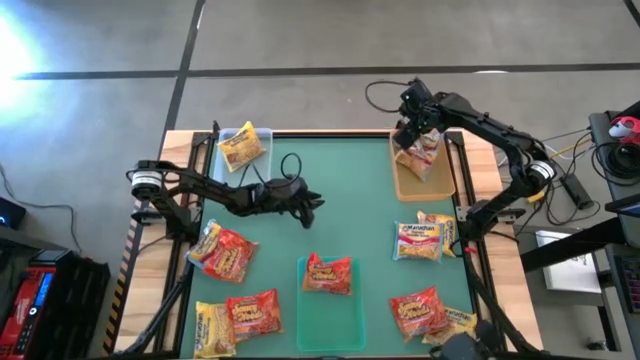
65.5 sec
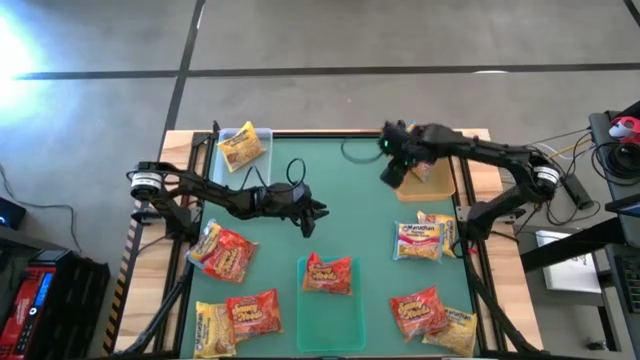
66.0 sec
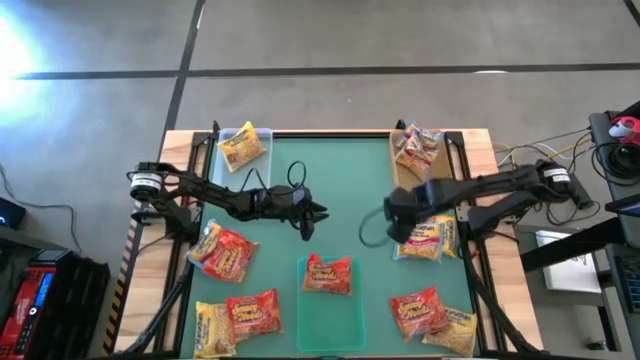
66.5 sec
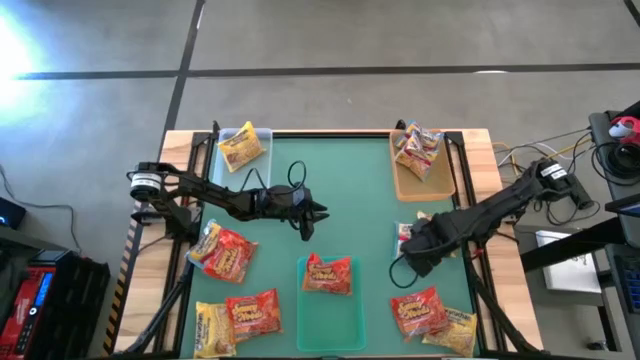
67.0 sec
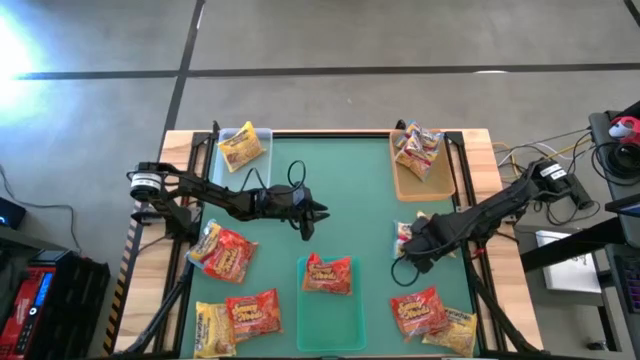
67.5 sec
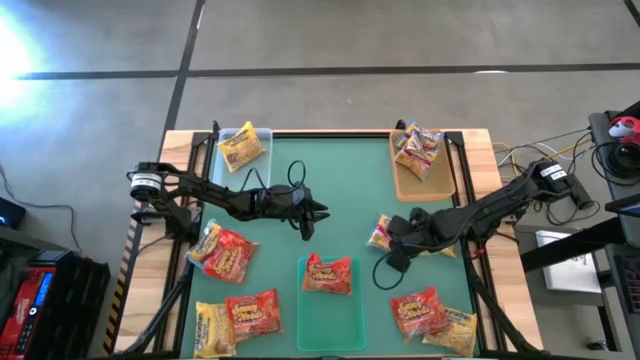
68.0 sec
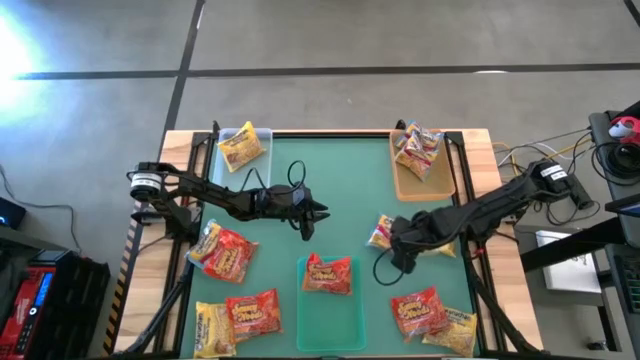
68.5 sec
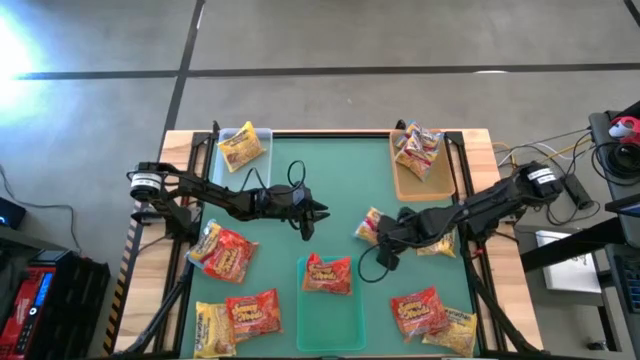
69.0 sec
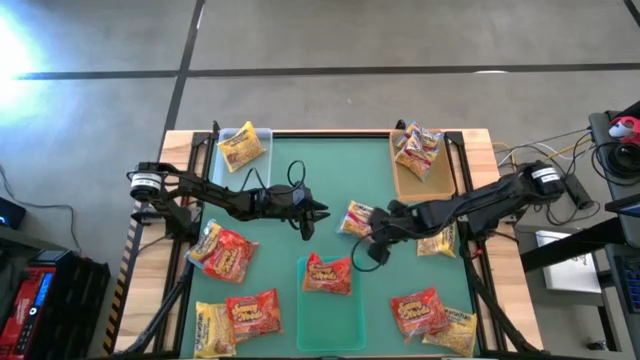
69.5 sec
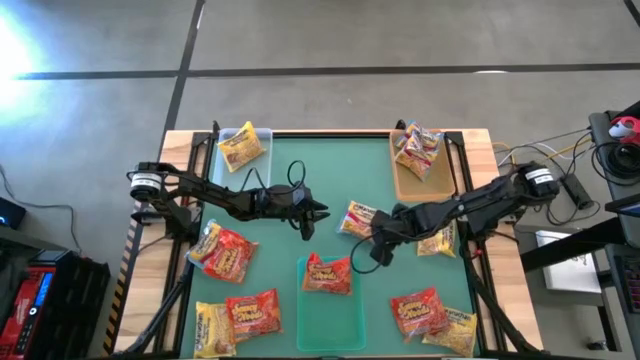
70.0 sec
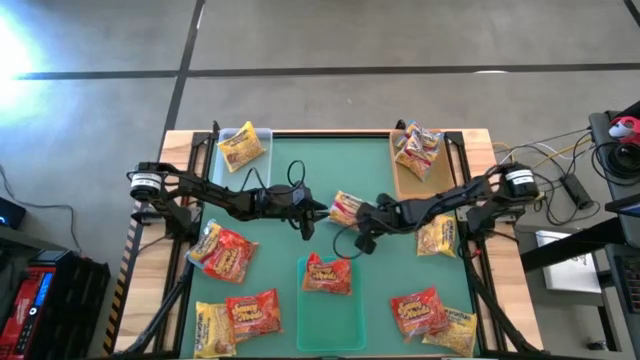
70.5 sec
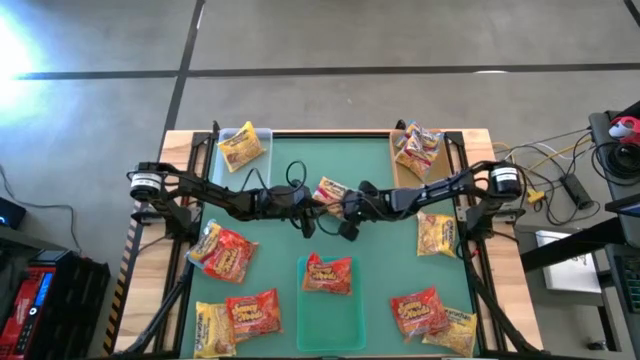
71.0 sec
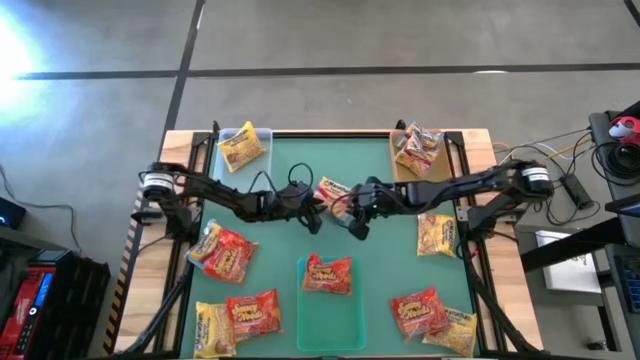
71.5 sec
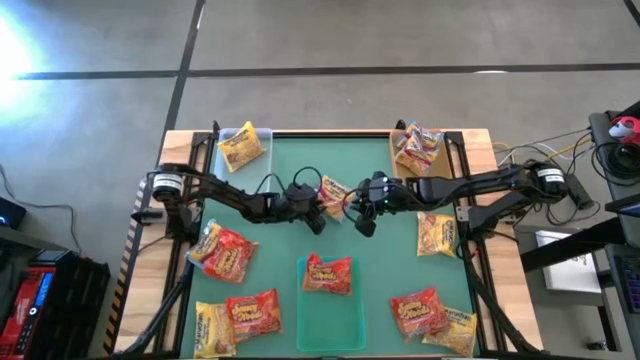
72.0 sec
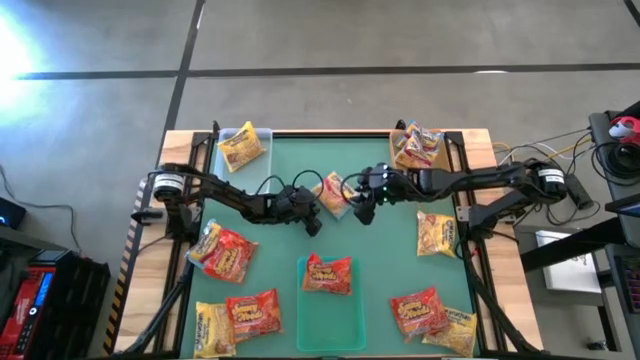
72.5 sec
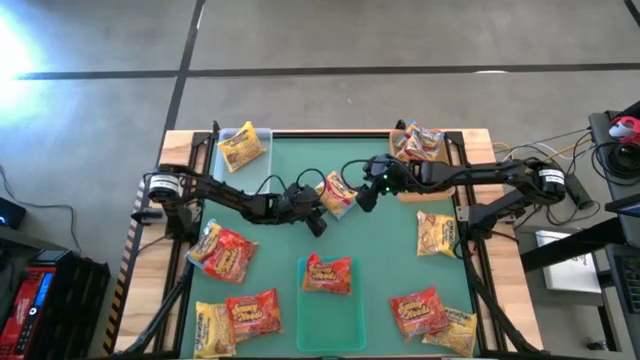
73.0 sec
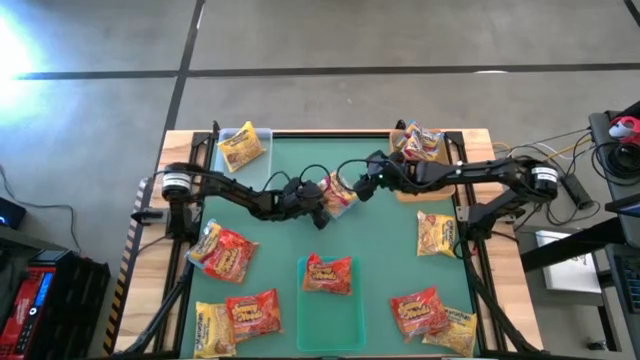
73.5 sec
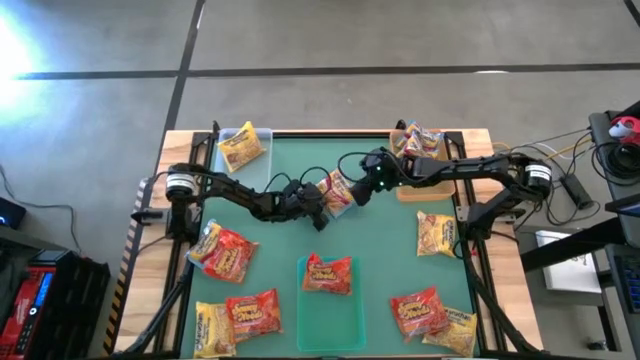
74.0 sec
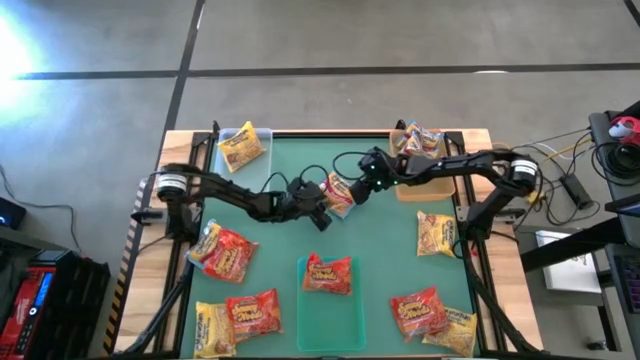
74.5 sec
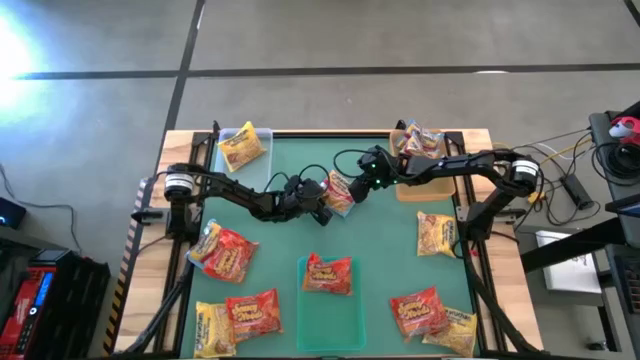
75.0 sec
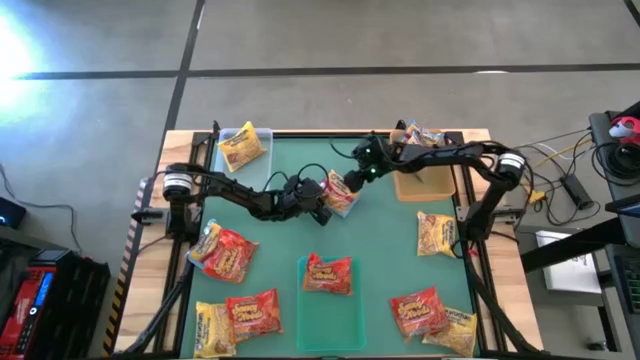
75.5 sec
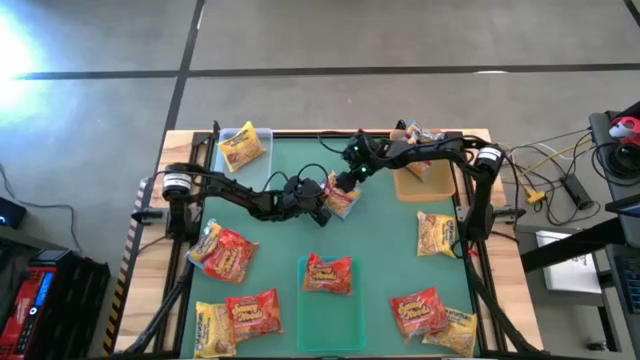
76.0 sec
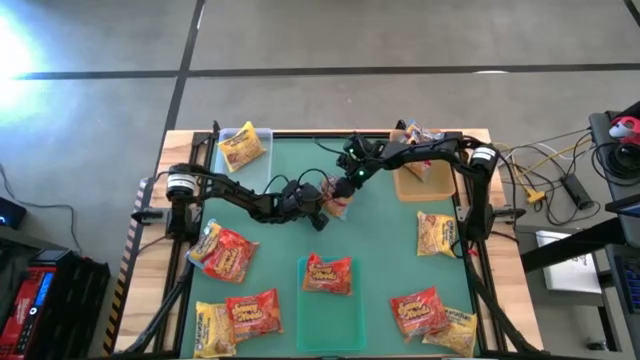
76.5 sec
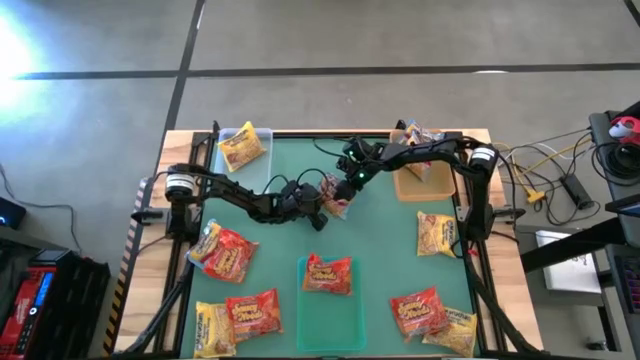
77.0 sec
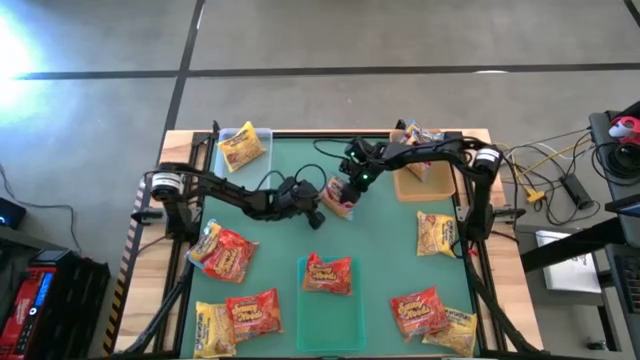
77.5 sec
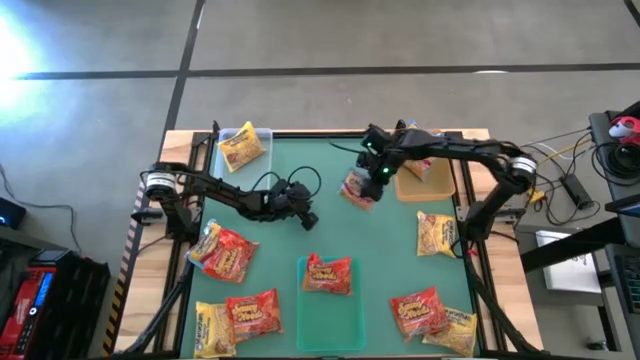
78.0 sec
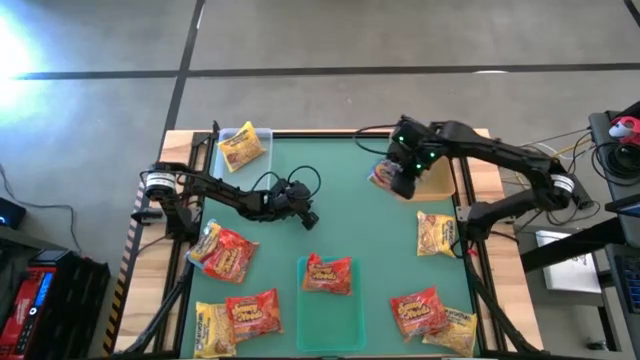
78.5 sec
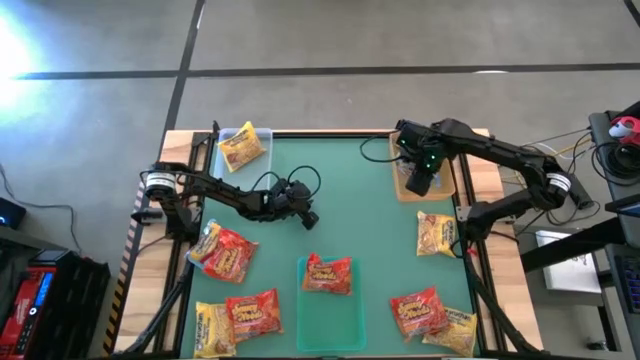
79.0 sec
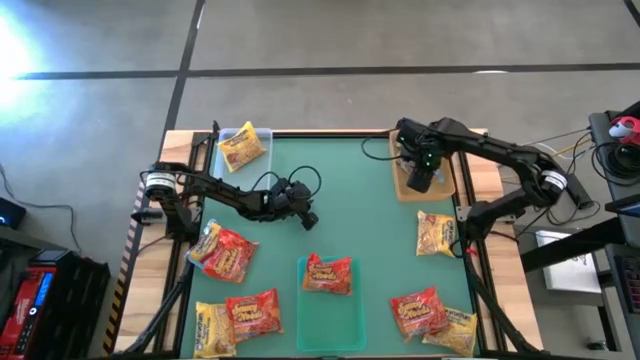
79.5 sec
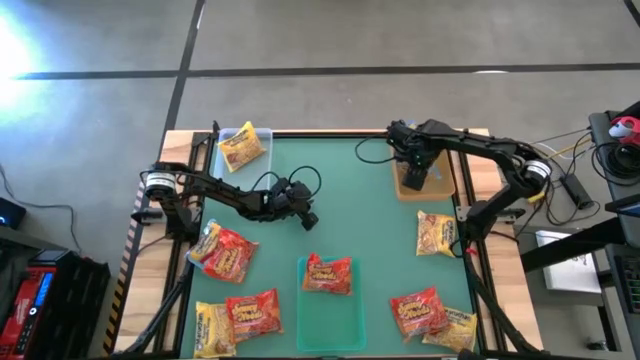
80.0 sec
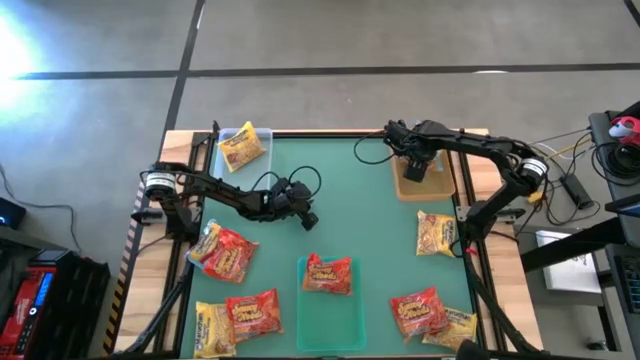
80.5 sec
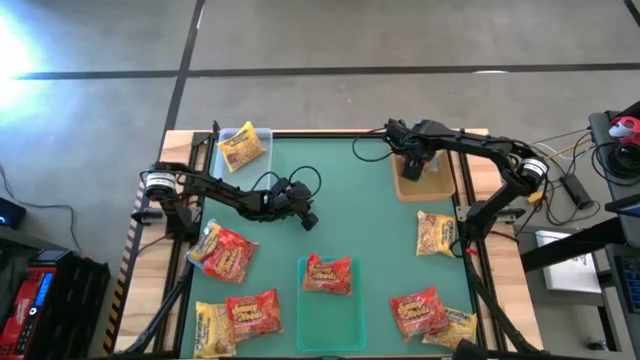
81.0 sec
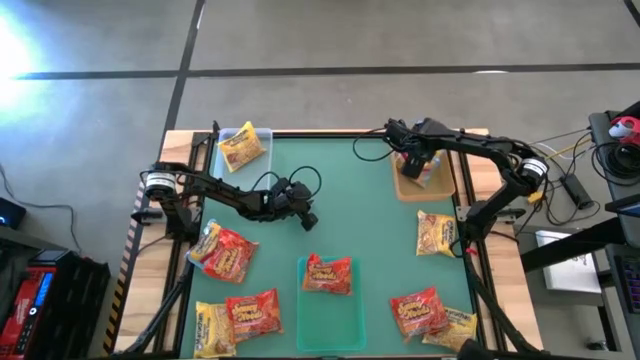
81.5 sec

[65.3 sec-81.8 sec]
Task: Sort Maruchan noodles
Put the blue noodle pack into the yellow bin

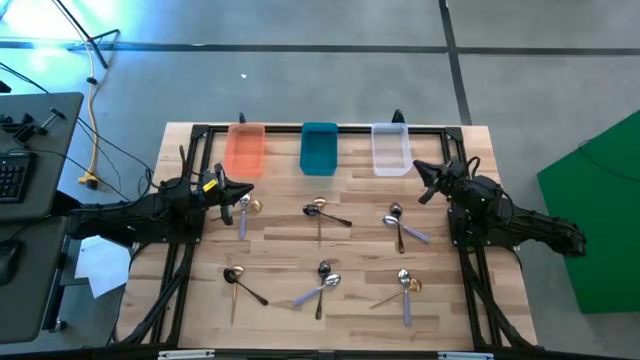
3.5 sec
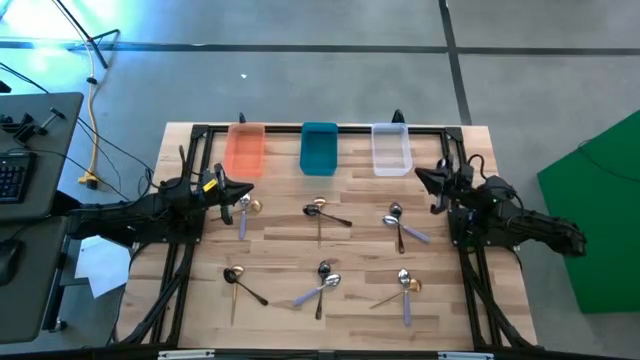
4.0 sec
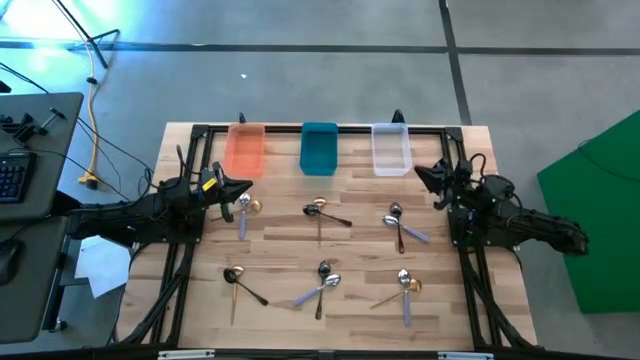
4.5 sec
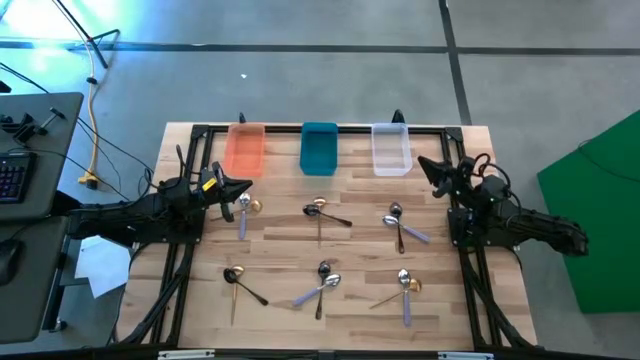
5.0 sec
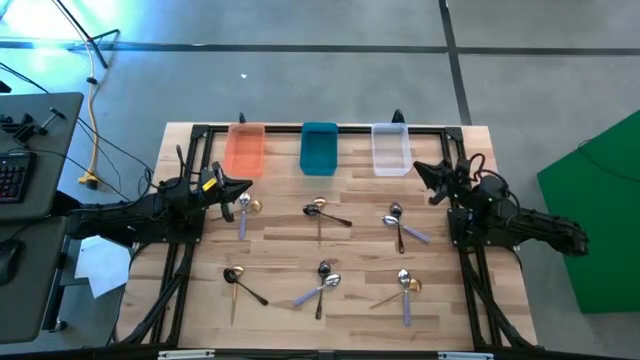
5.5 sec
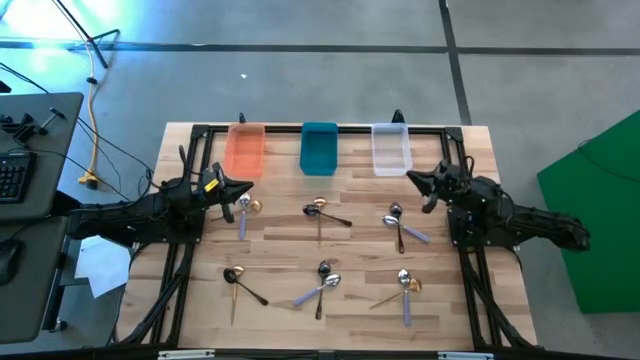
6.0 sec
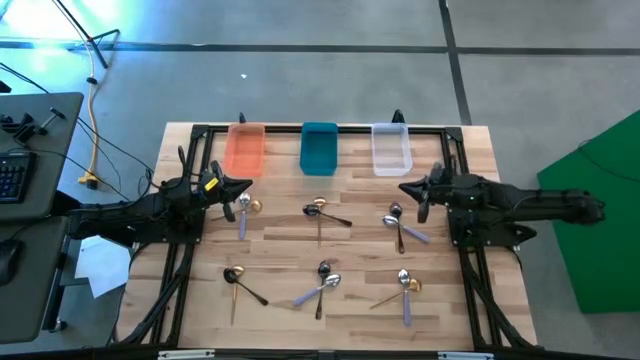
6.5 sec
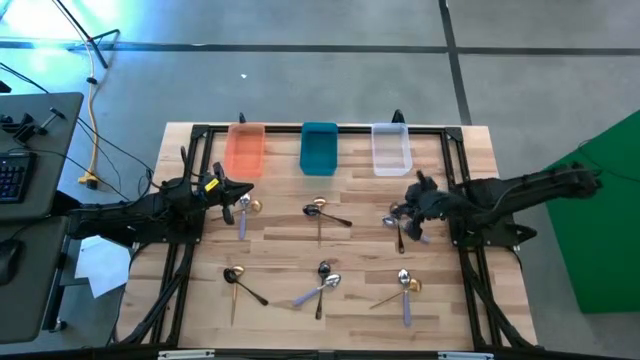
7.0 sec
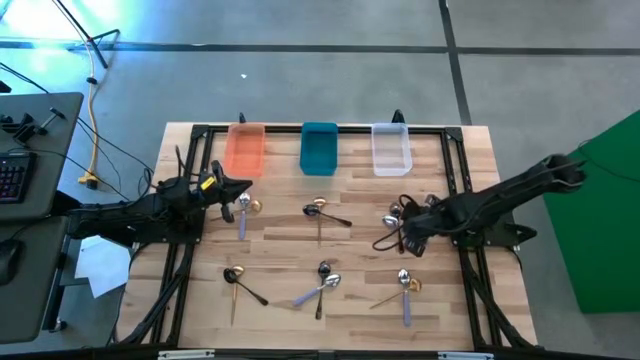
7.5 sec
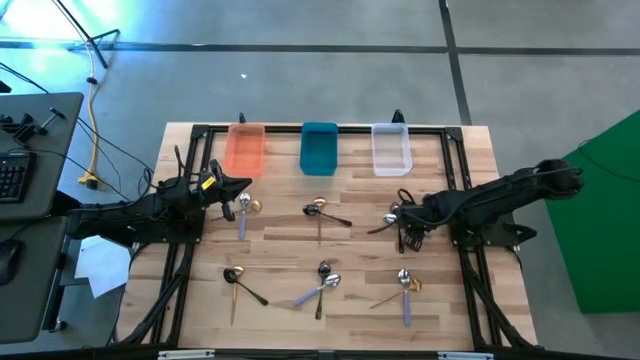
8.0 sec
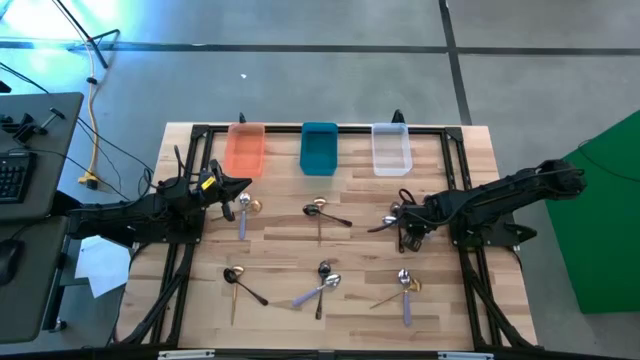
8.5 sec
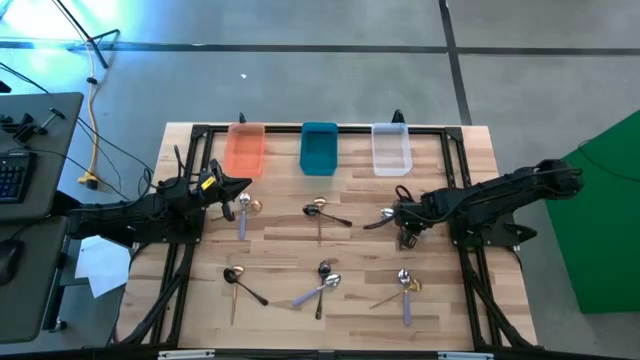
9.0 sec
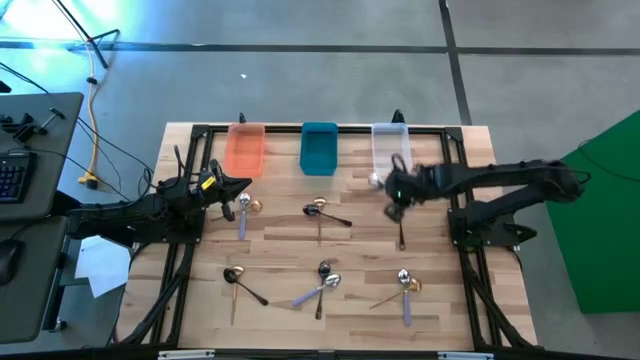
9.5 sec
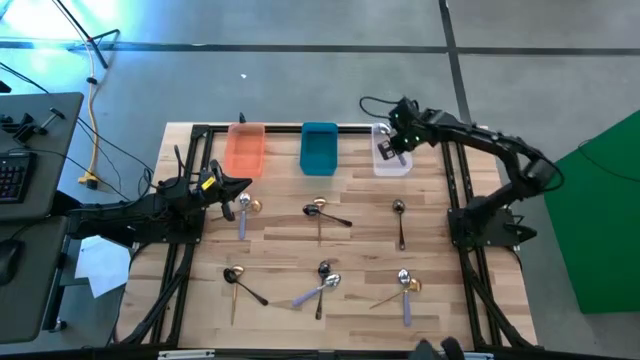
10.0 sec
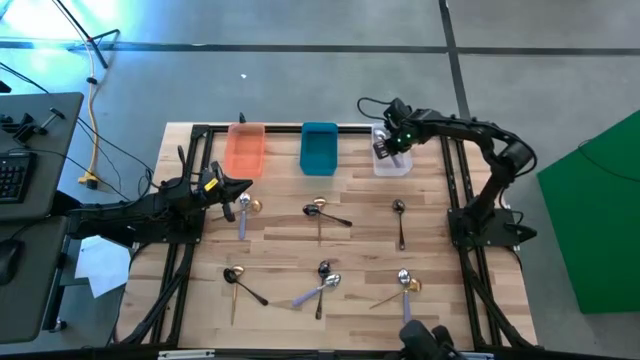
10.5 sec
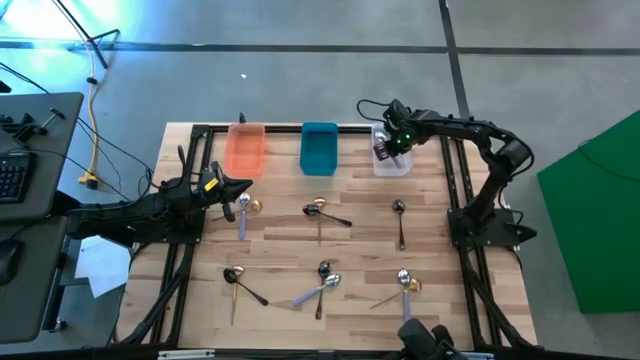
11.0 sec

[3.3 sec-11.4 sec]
Task: Sort silverware by color (type)
Put the top right purple spoon into the transparent bin
